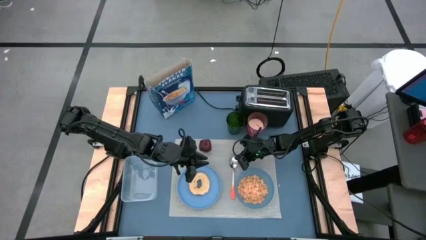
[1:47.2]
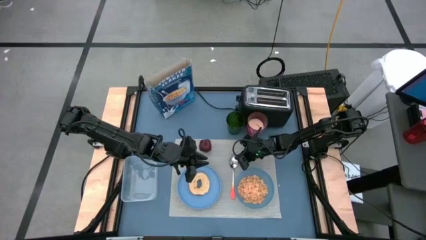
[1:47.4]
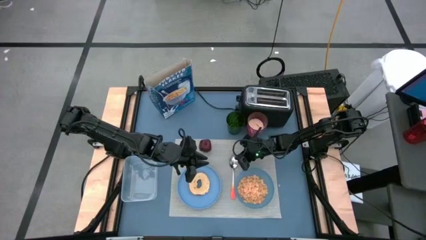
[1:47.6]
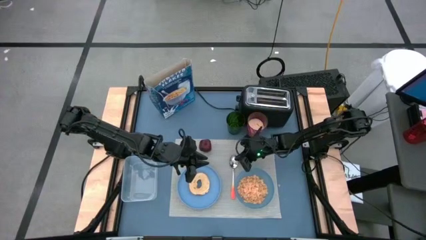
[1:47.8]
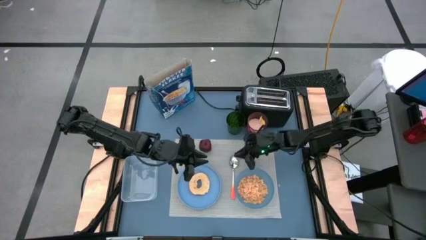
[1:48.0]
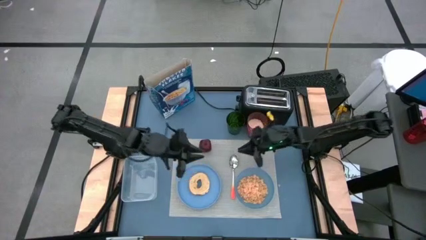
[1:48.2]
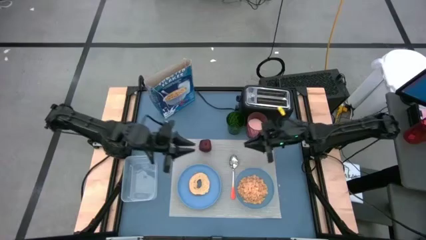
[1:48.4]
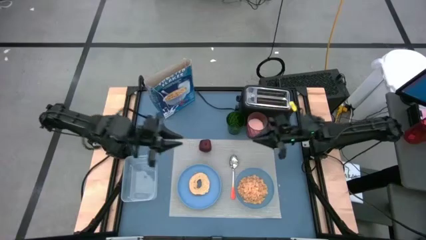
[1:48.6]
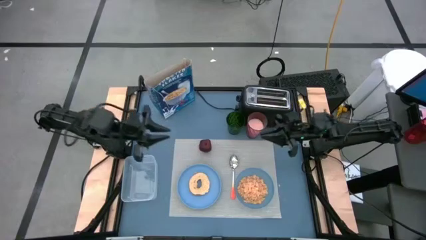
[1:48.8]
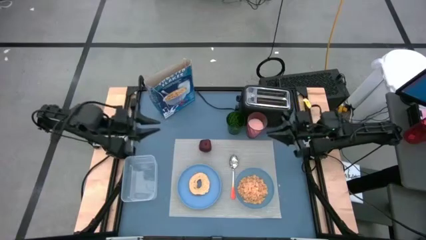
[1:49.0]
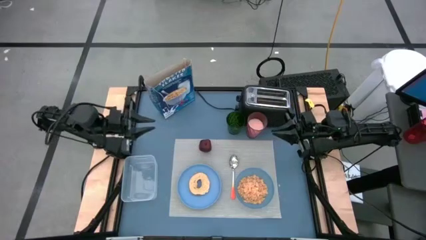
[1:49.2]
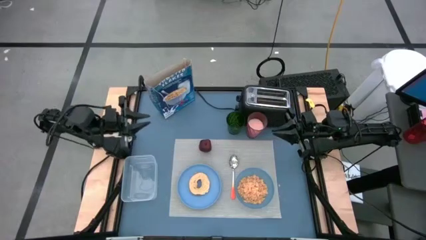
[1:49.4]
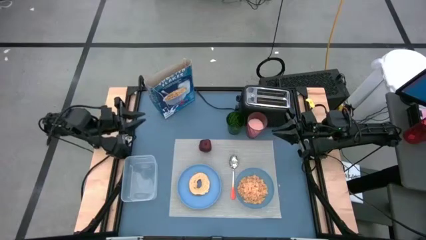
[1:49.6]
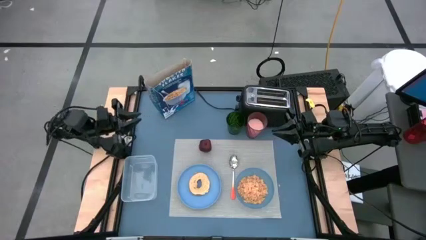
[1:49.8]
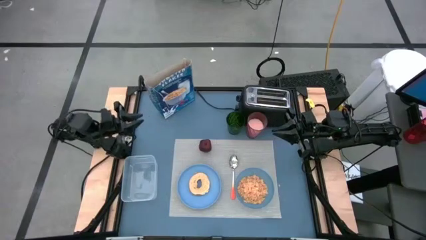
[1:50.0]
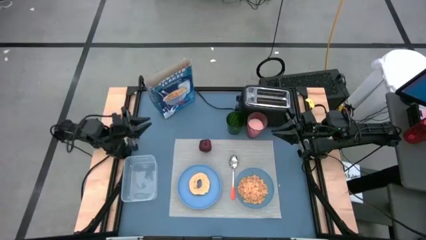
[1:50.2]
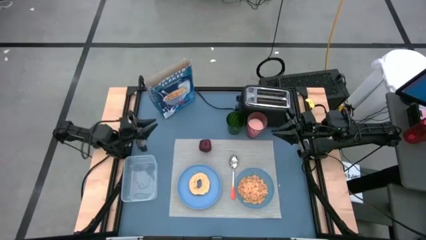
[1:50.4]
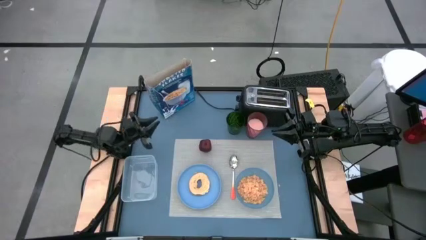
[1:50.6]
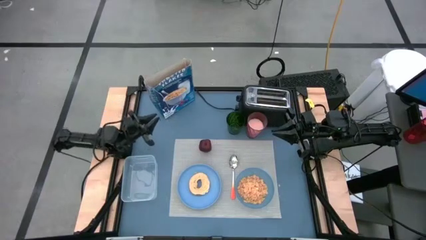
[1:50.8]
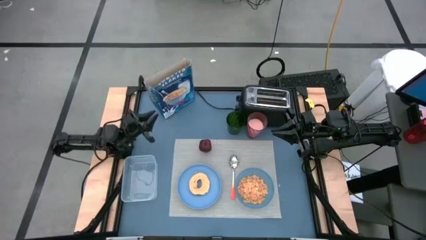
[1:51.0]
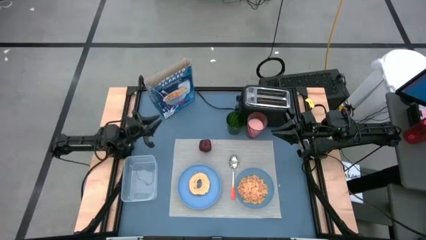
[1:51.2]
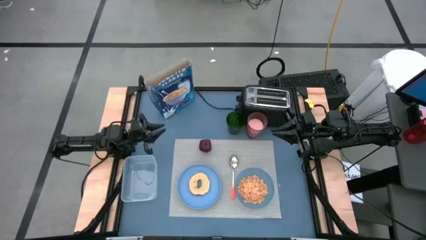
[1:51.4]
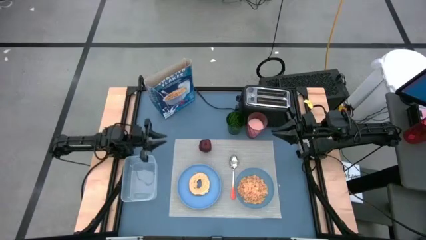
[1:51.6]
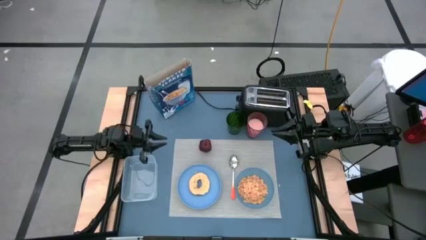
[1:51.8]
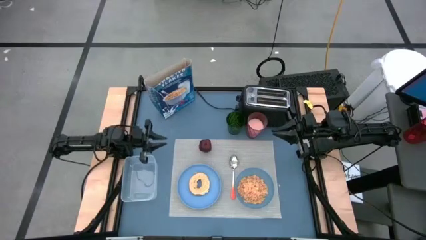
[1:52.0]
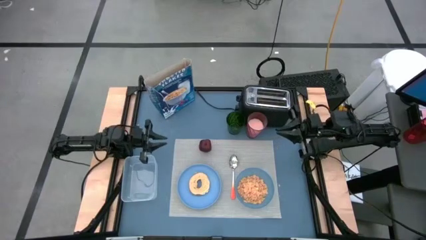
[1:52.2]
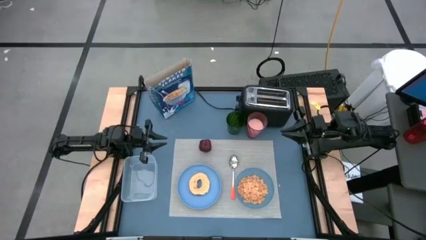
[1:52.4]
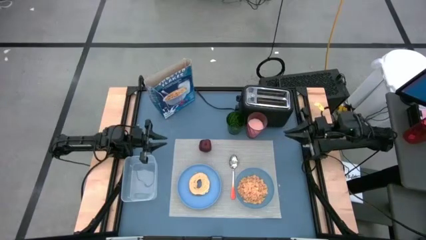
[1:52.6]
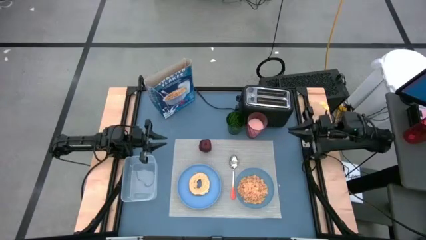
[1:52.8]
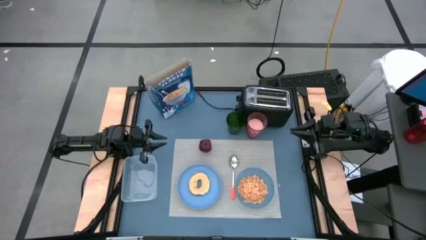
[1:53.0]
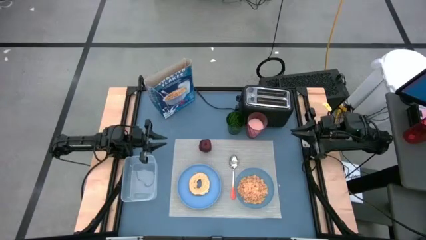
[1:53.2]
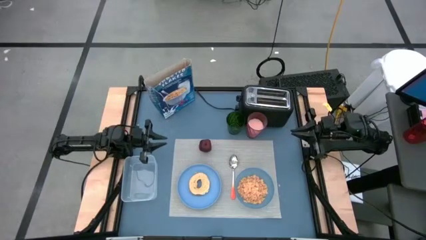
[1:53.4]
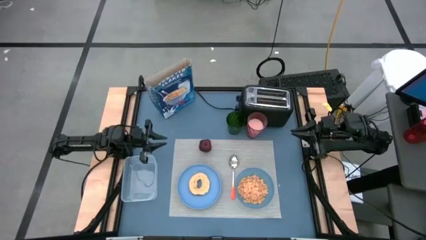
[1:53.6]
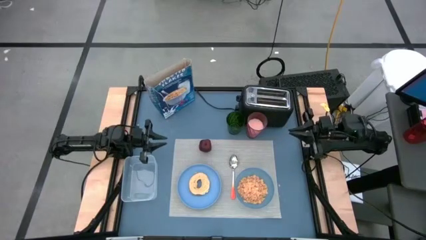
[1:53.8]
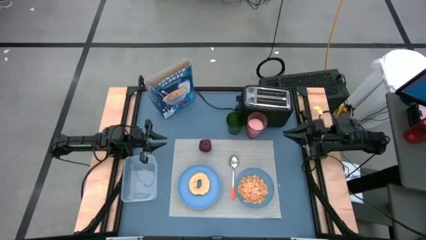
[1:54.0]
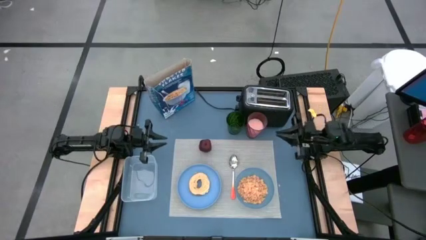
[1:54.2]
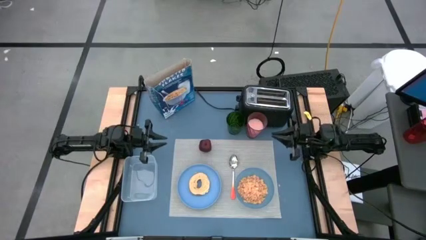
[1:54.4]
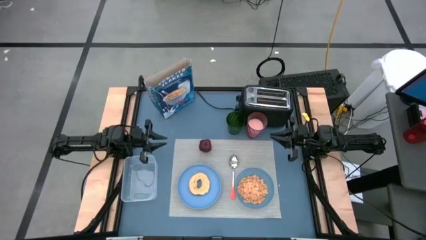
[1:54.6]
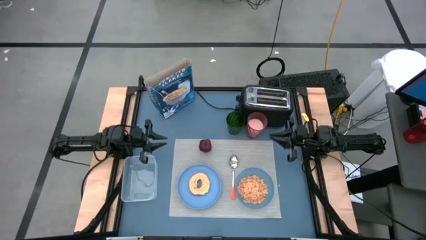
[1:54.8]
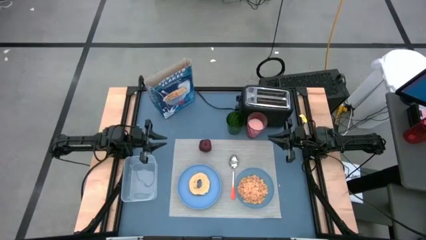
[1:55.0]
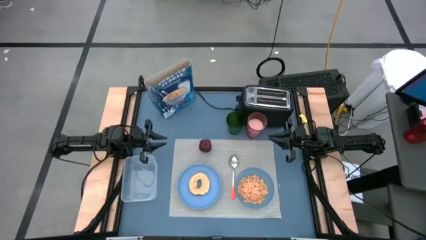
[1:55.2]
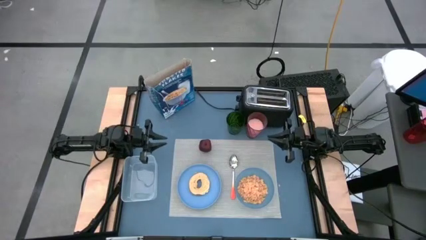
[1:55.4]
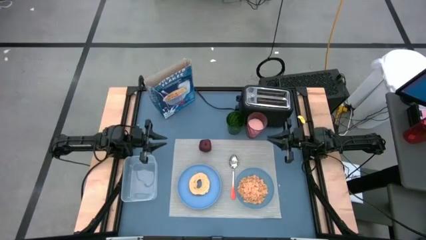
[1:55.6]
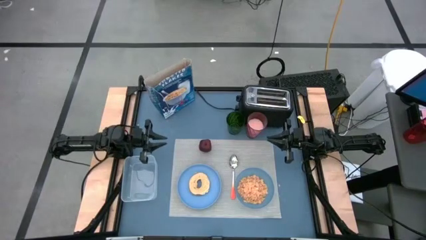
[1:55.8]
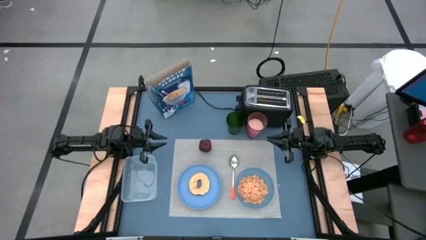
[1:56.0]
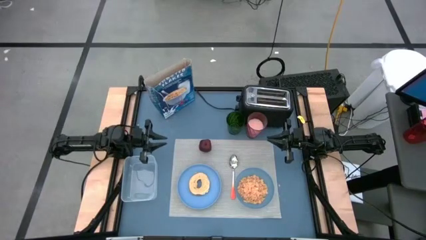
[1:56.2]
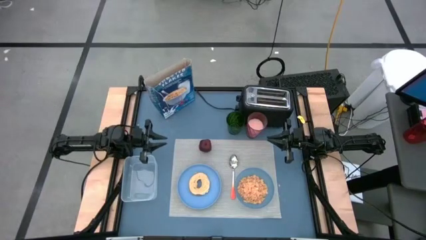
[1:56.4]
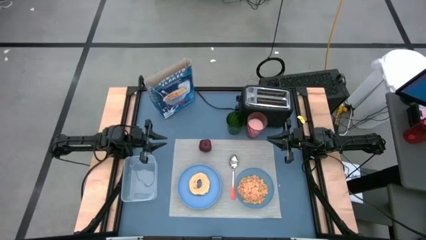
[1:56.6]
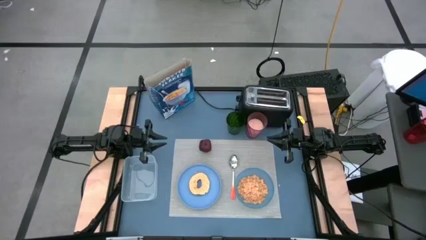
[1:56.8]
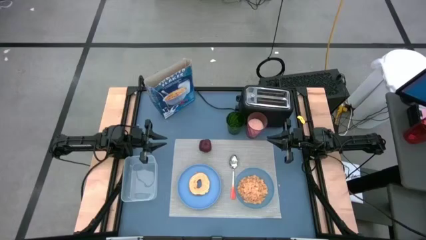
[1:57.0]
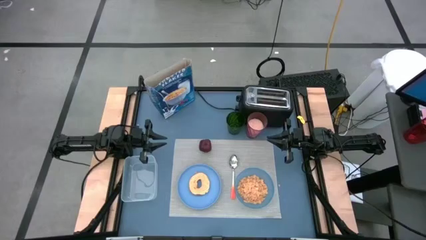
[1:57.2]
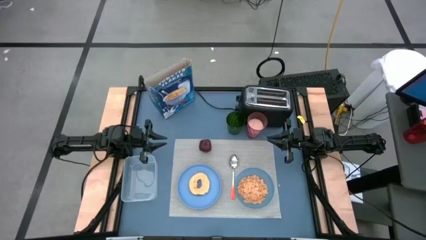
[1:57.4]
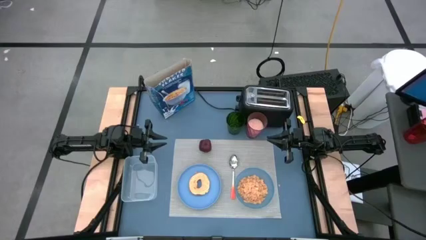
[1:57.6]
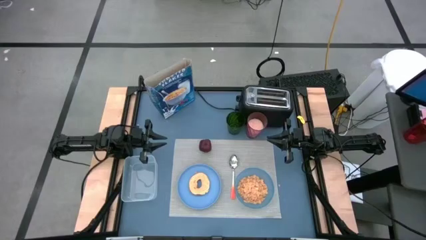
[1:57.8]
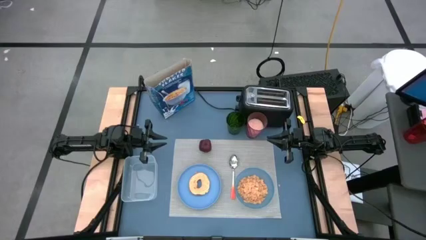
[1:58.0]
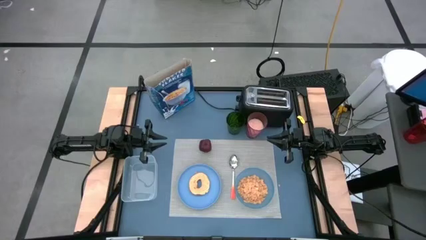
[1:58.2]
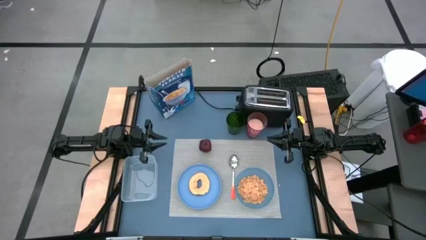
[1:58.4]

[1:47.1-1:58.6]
Task: Arrange a breakfast setting
Return to Home Position

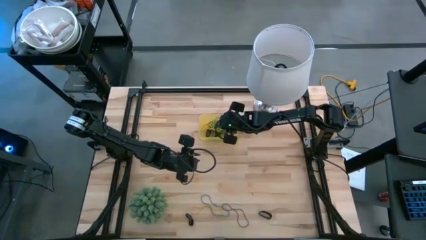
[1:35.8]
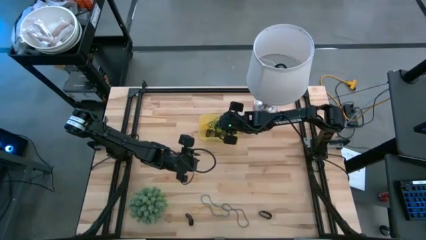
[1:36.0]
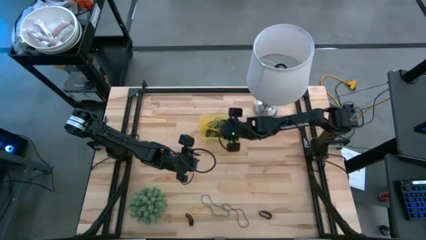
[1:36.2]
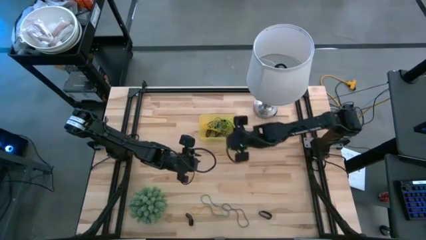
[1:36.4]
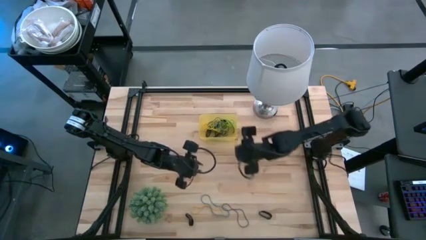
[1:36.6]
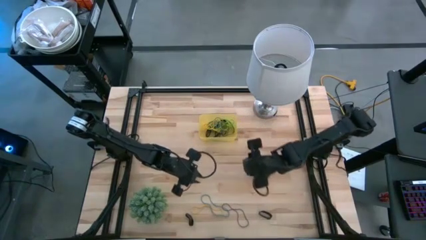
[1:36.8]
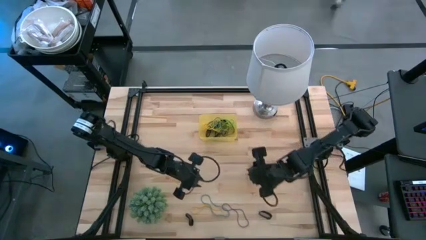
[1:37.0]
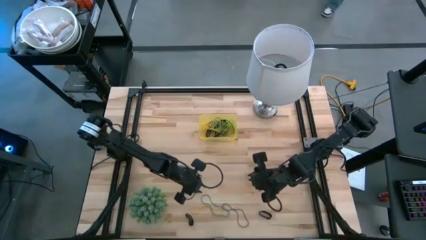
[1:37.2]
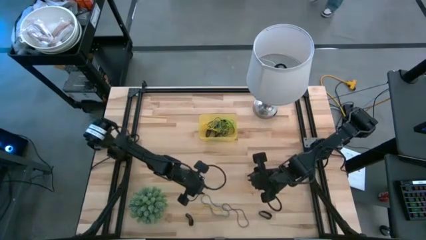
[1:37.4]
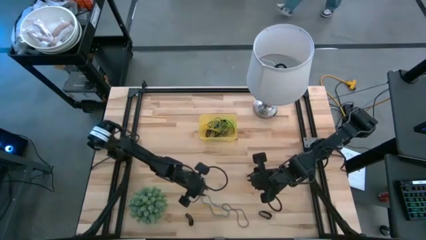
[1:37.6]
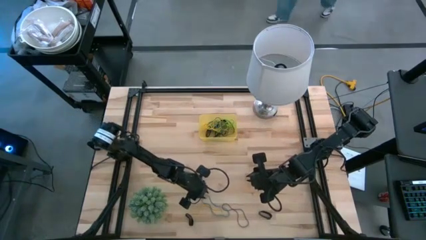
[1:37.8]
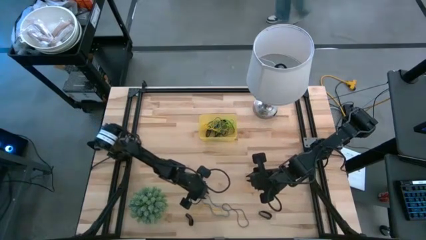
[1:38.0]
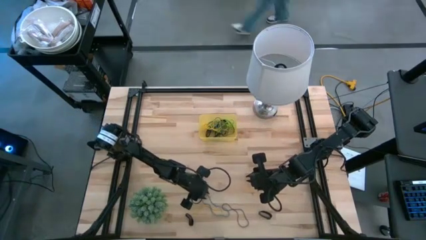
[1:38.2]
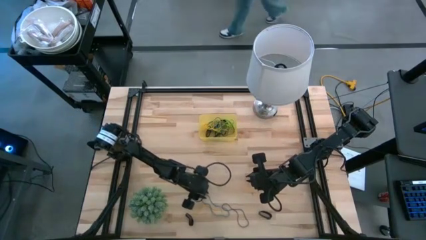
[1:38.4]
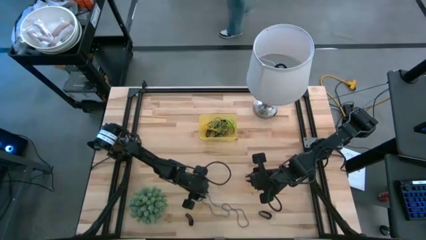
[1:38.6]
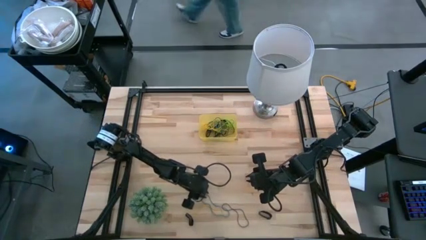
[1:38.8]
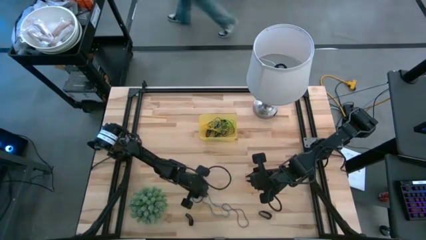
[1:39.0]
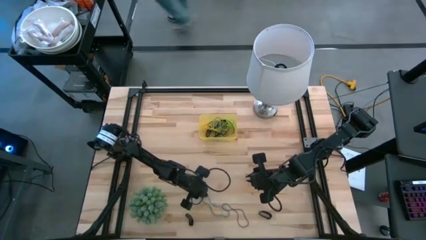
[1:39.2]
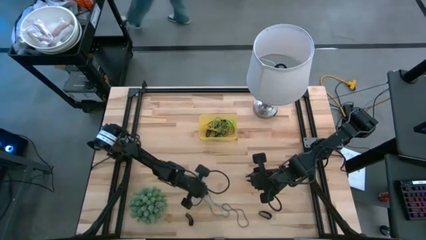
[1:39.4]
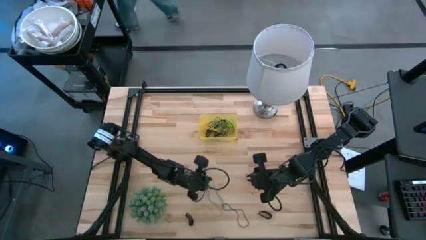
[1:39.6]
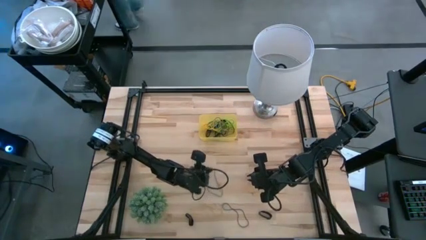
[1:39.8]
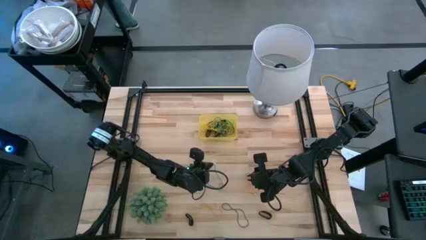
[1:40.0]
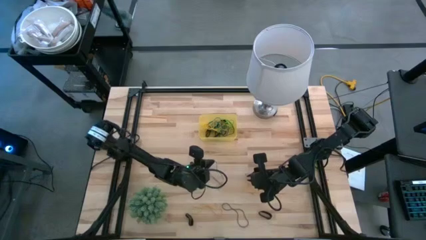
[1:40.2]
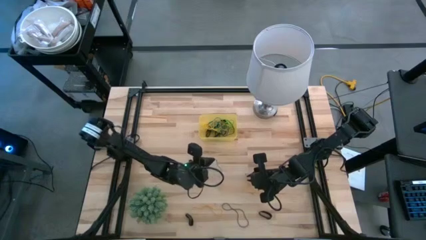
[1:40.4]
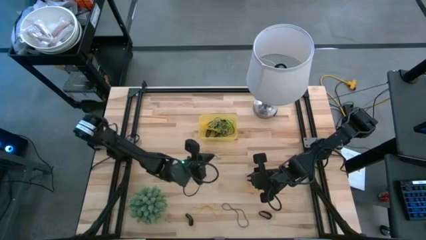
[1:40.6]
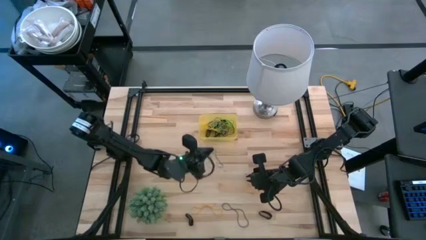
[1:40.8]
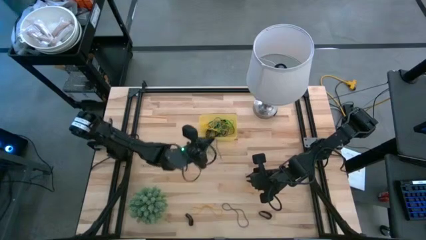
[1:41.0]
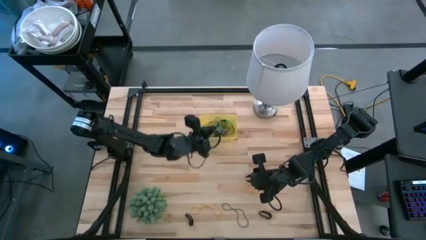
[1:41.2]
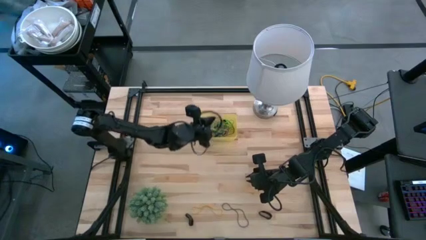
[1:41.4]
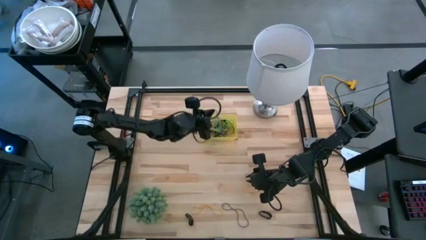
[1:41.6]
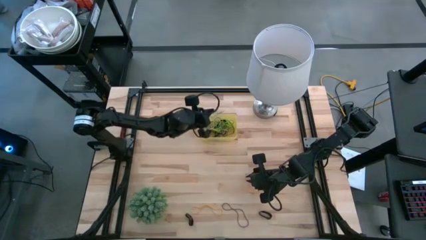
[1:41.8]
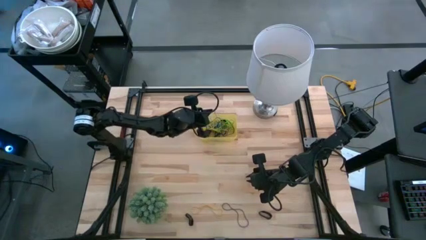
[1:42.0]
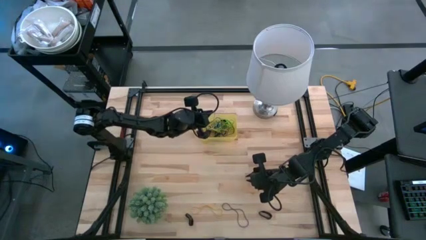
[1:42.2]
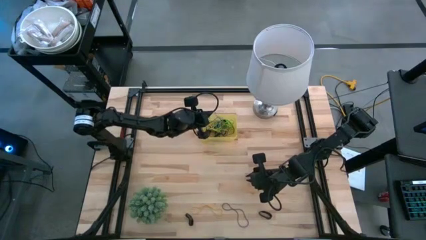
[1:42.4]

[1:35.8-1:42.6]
Task: Pick and place rubber bands into bin
Put the blue rubber band into the yellow bin
